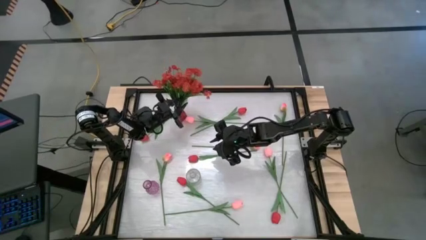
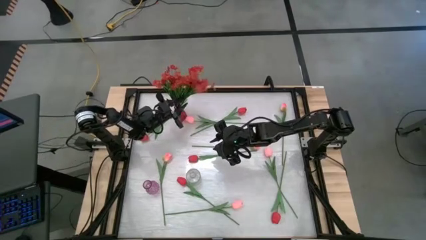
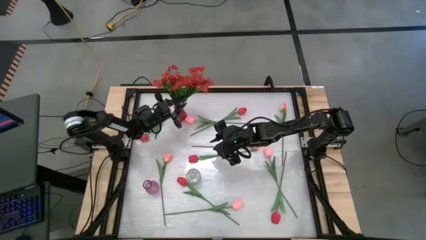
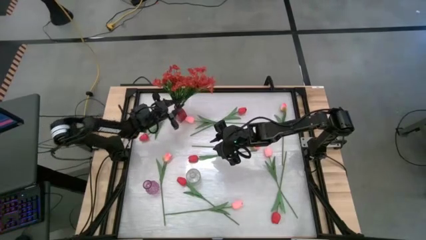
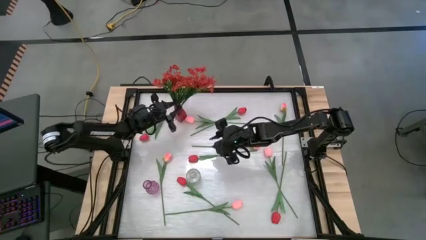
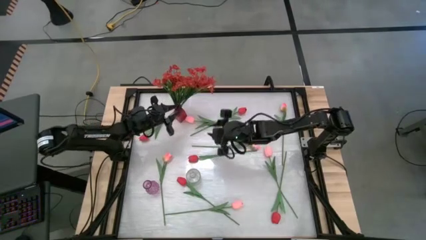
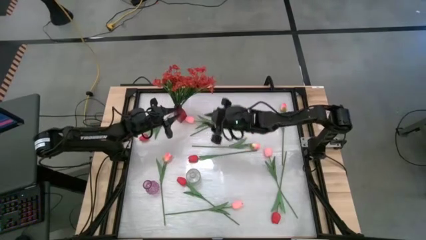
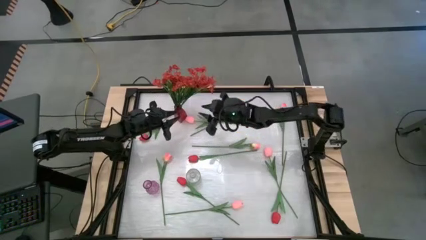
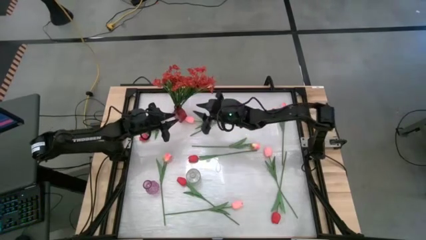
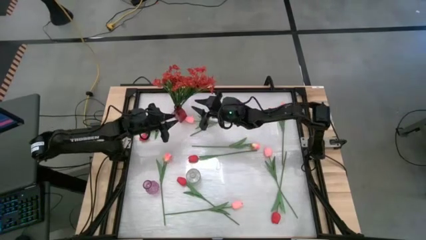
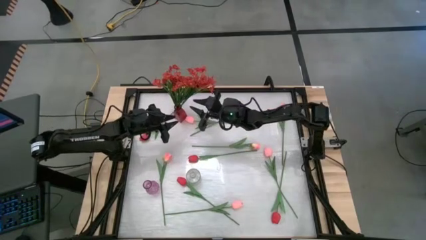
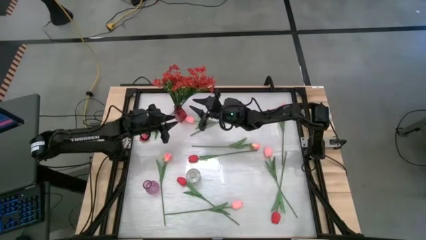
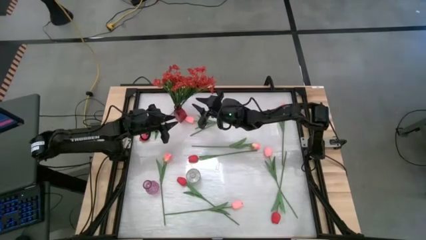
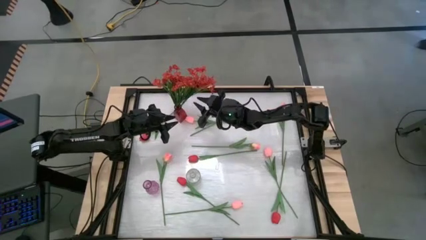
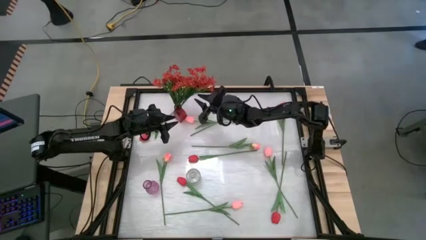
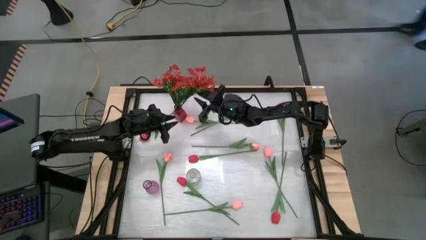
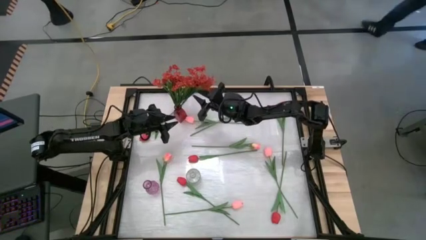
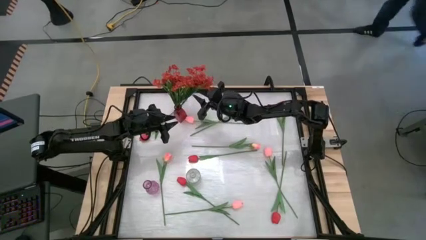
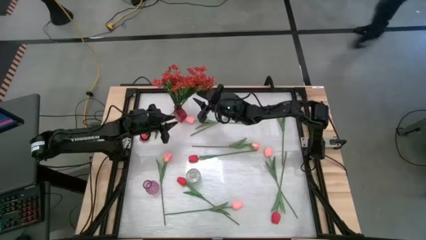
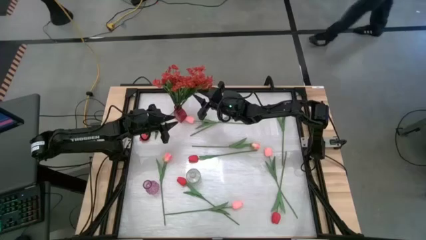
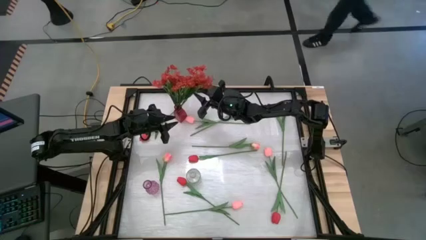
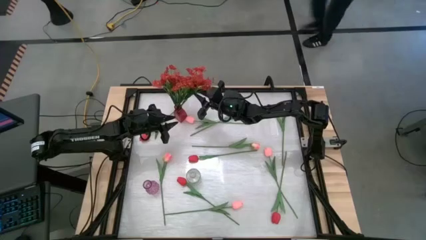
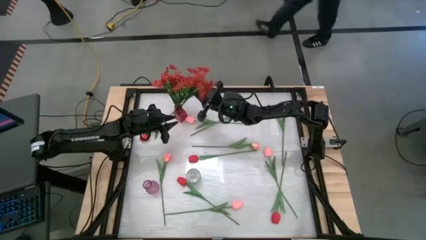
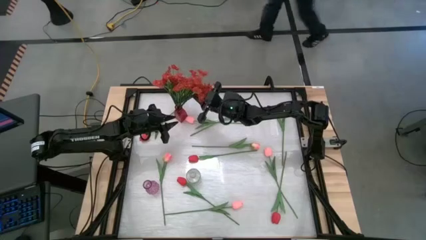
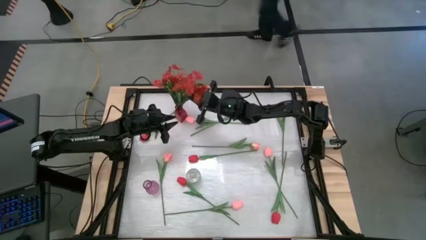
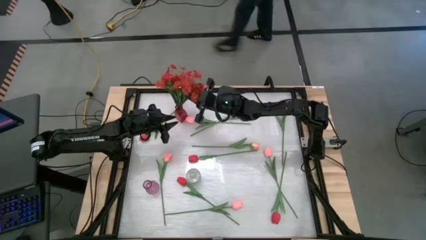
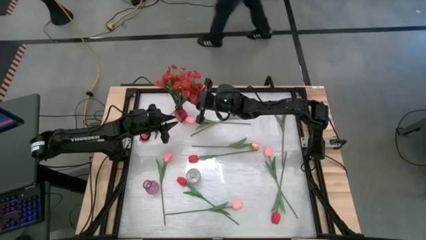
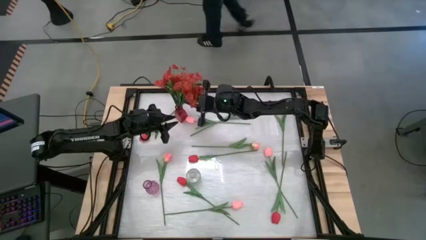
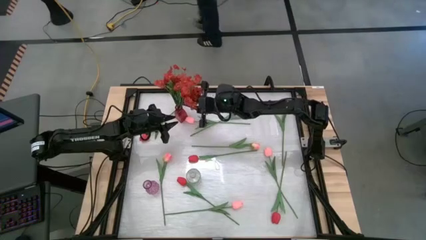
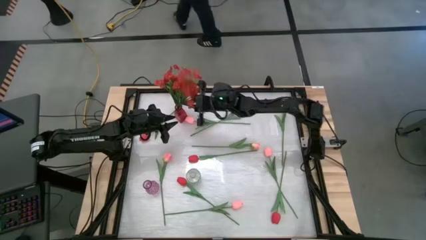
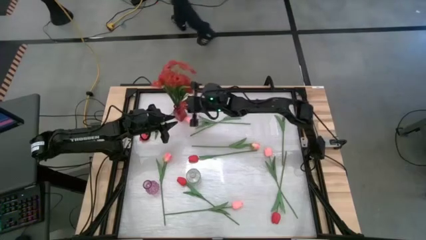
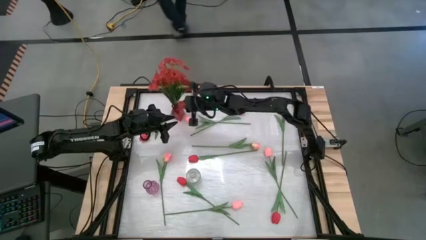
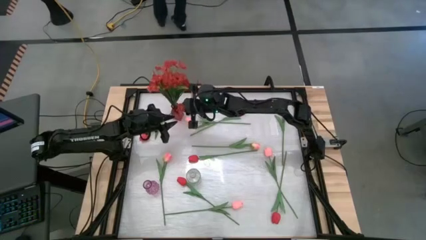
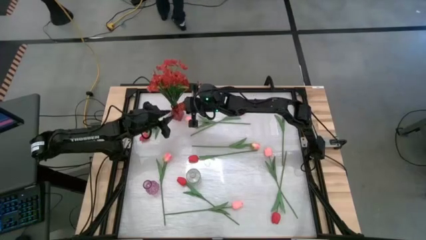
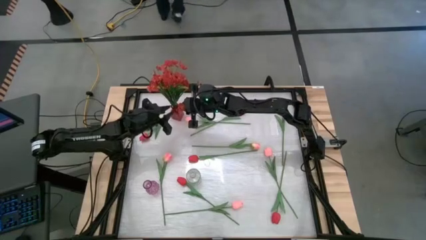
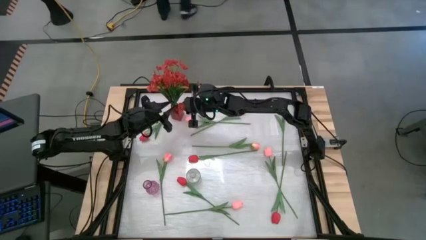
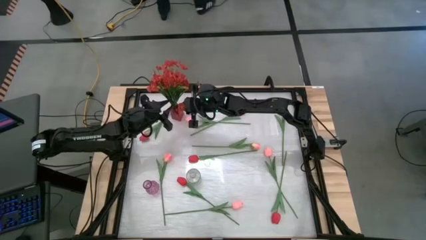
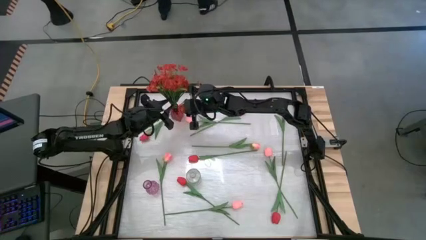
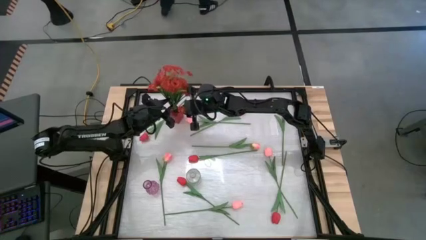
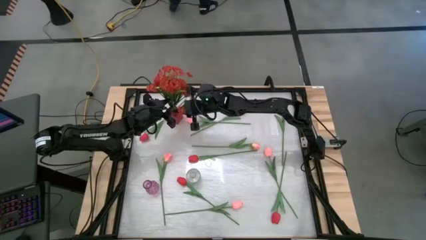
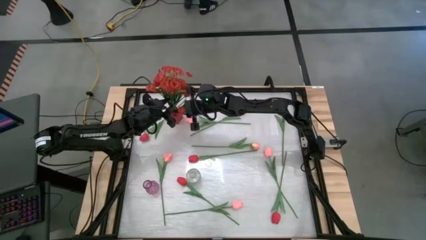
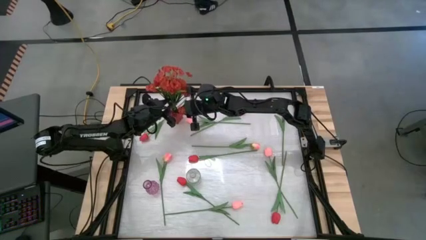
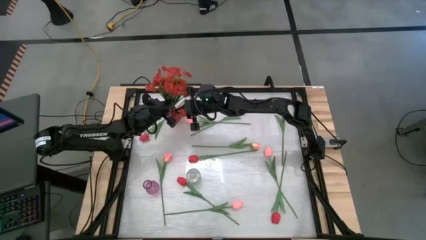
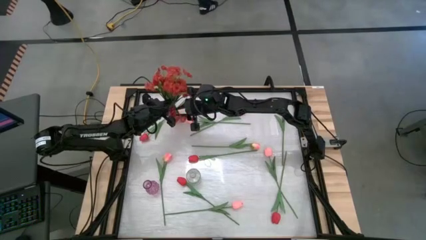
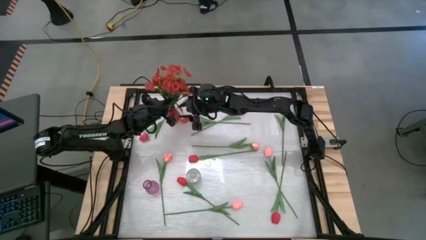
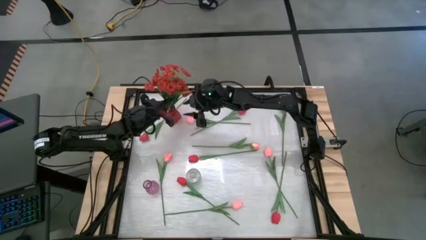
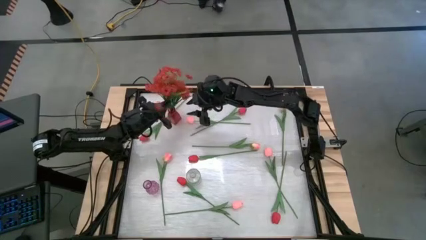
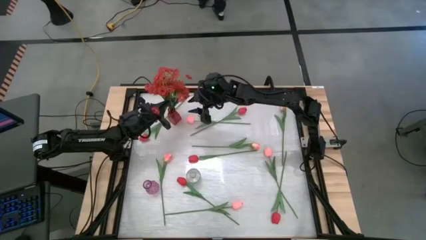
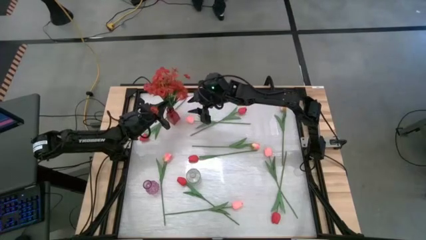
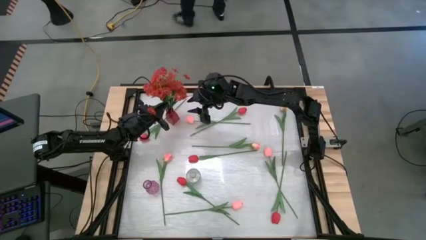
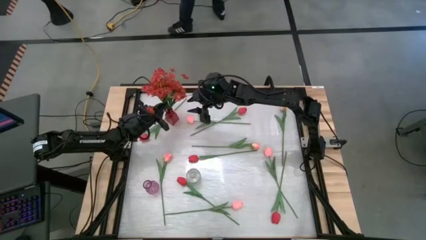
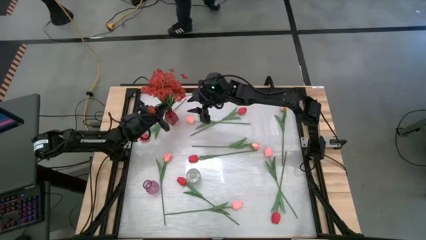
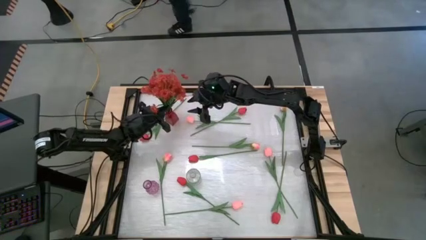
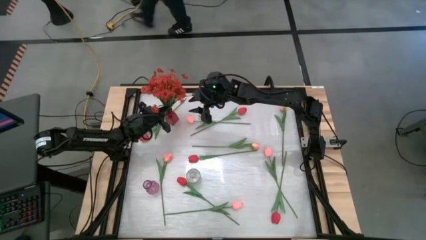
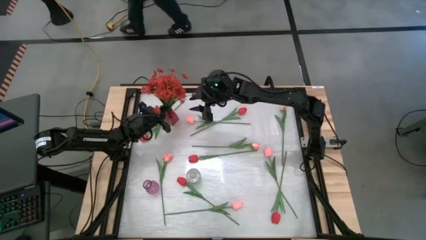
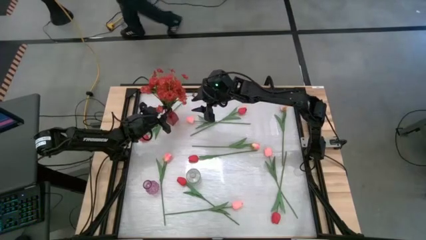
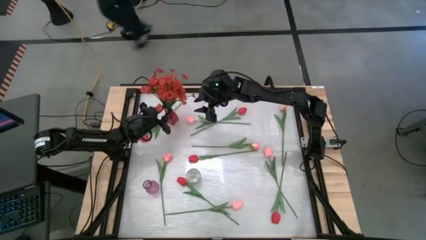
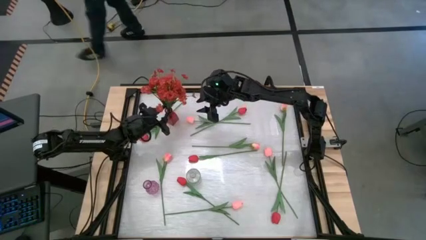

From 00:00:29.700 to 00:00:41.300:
Task: Sort flowers into vase by color
Put the orange flowers into the red vase
